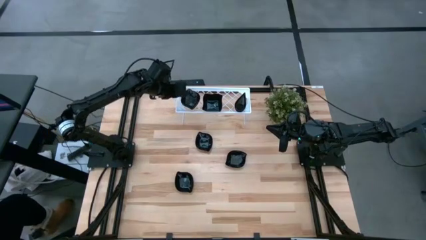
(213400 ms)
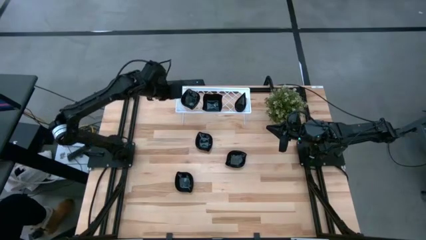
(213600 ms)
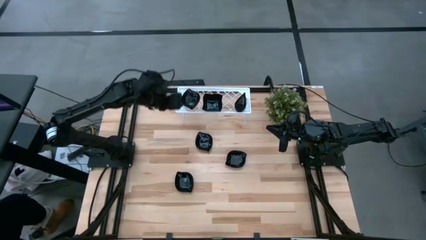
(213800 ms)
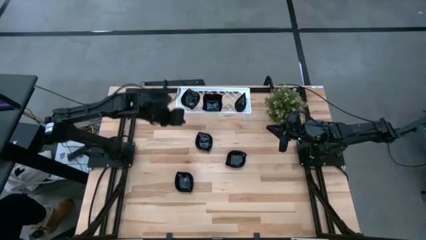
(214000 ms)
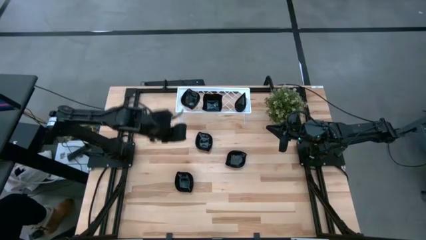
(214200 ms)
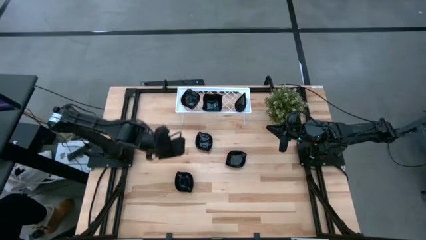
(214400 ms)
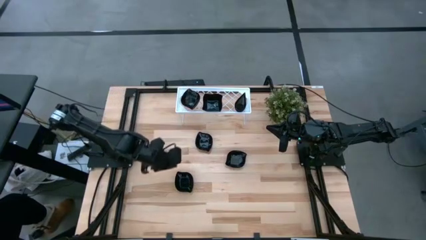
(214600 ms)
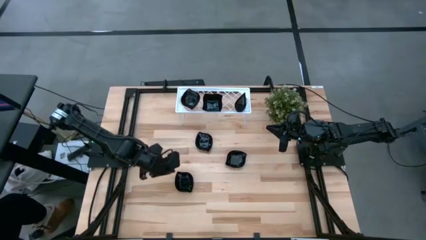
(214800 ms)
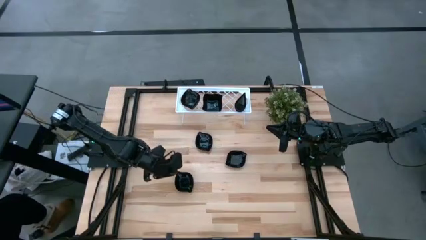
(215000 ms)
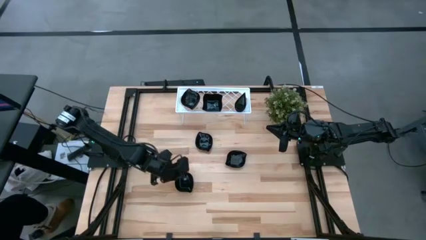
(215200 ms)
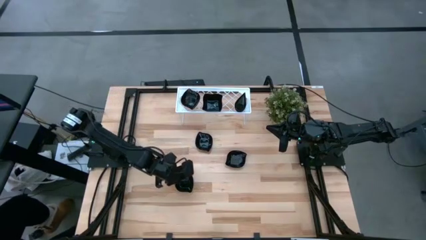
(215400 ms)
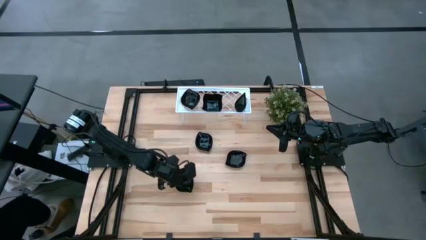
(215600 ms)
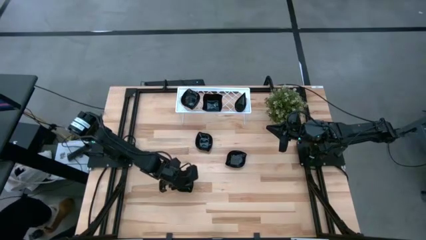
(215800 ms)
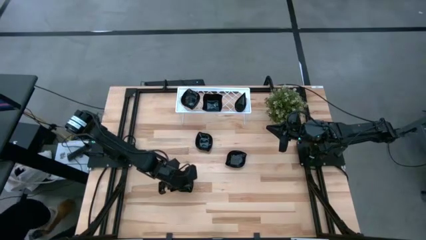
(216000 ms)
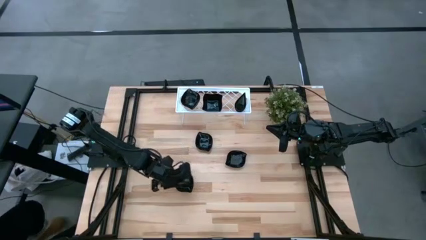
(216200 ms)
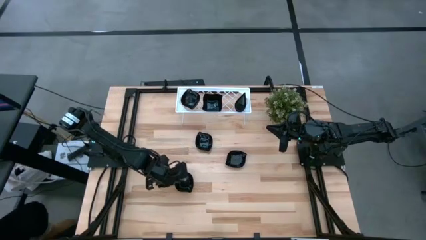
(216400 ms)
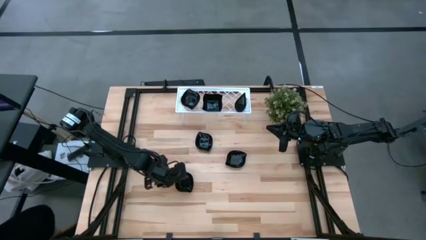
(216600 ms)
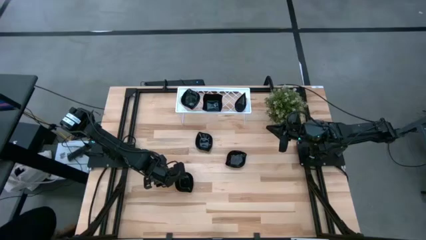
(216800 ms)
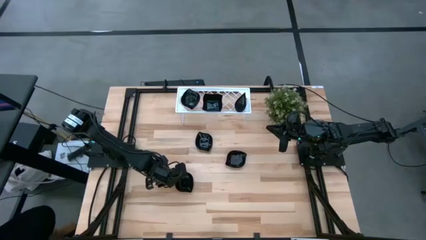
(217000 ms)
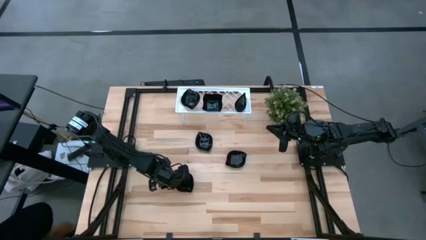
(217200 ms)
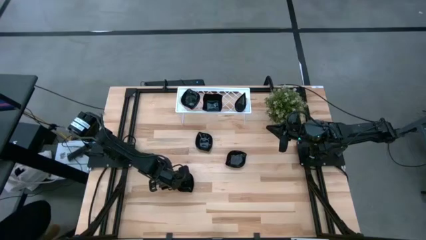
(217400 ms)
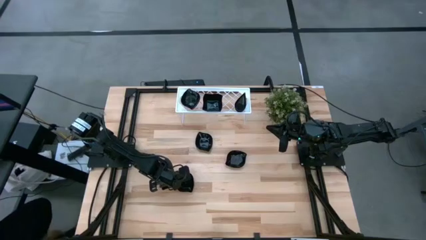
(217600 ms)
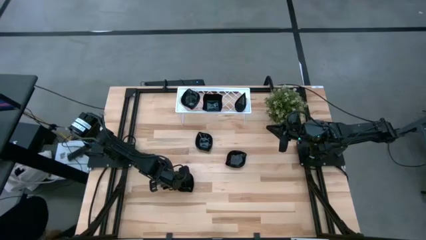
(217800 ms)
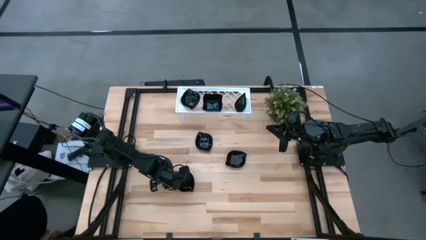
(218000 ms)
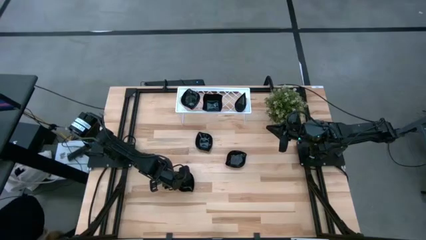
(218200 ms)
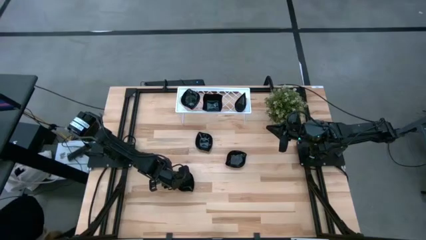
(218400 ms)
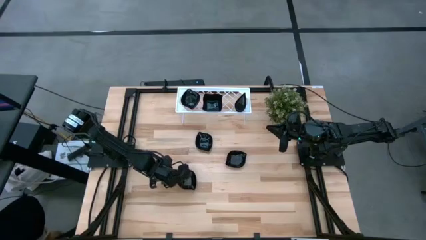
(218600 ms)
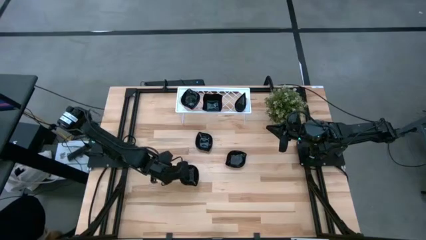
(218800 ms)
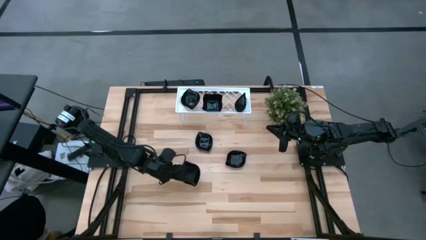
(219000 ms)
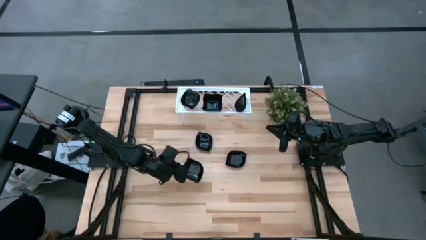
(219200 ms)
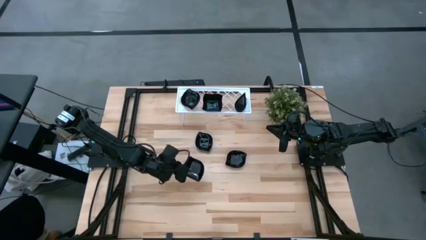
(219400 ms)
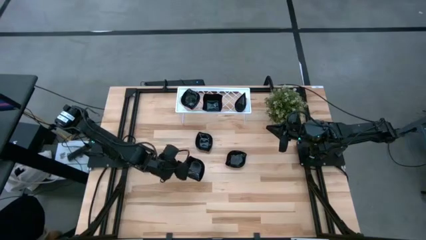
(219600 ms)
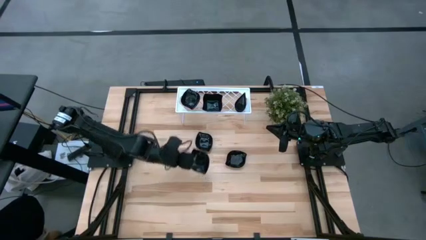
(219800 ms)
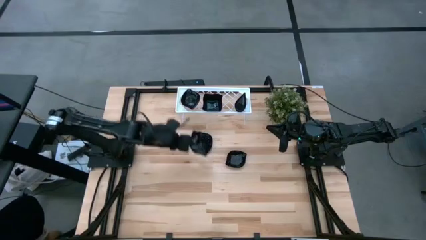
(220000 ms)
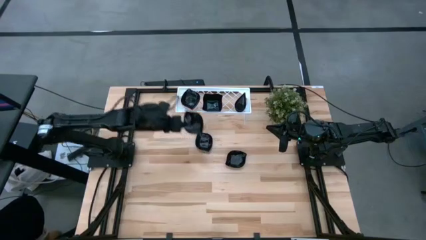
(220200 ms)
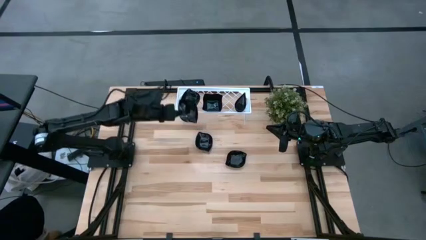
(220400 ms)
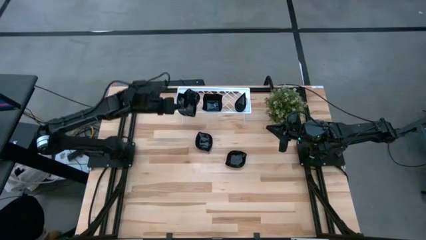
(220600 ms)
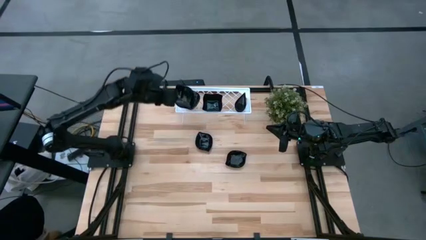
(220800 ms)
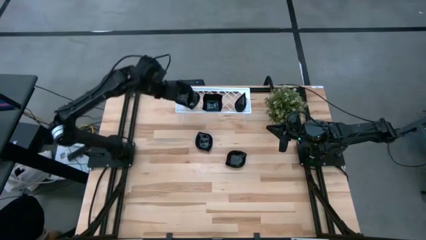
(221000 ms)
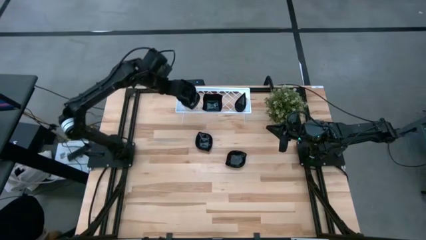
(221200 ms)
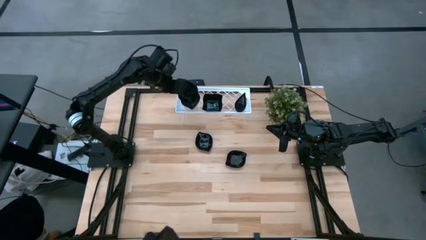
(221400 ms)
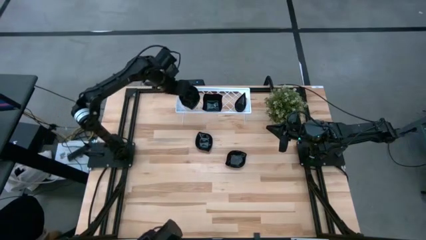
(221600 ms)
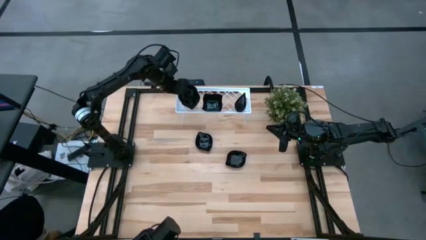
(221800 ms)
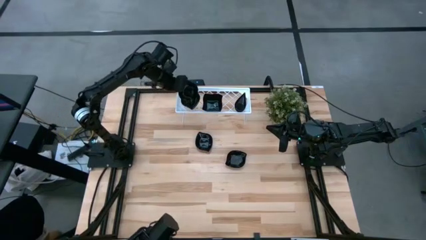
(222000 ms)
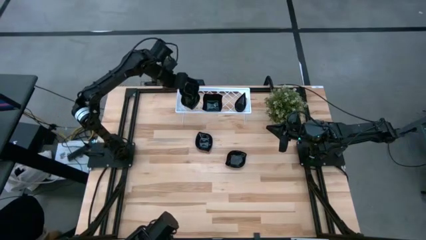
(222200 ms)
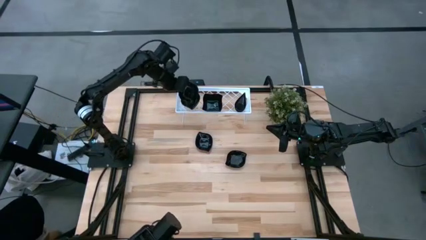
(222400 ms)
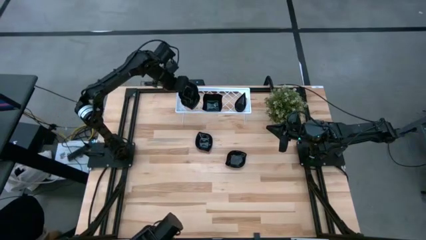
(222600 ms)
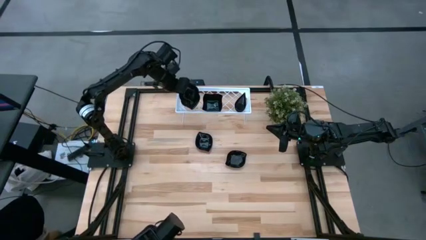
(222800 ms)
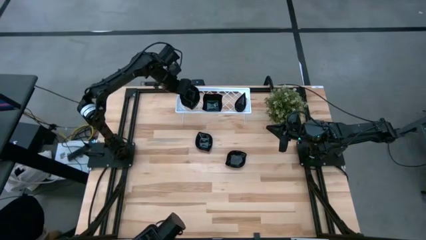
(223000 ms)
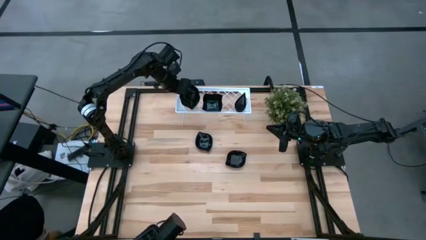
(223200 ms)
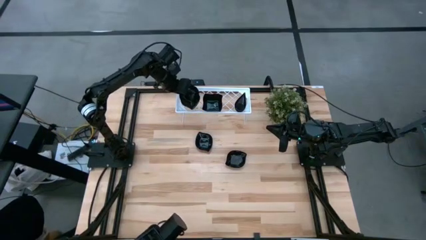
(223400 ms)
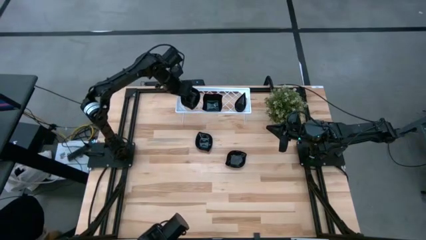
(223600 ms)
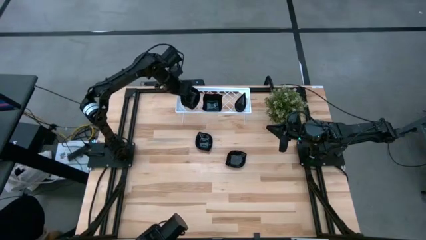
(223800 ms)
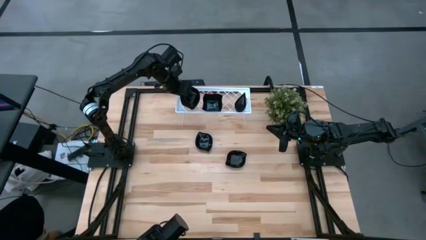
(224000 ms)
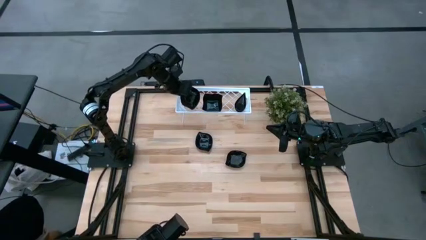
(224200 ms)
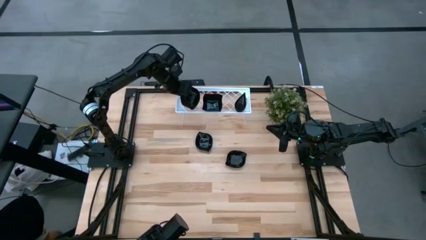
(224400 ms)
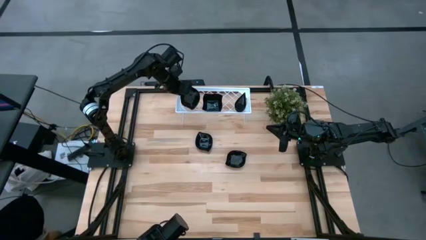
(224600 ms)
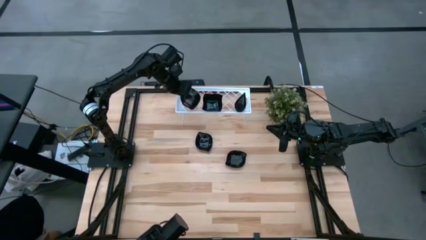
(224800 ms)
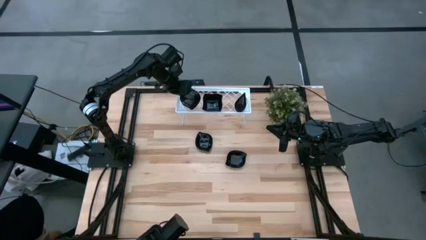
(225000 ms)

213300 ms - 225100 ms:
Task: Pick & Place Mini shaped plates
Stack the leaf-shaped plate on top of the leaf-shaped plate on the shelf
